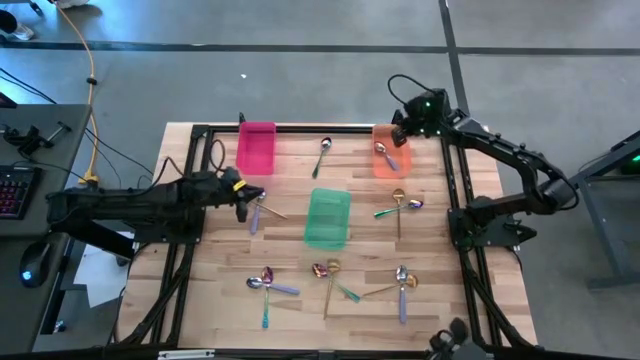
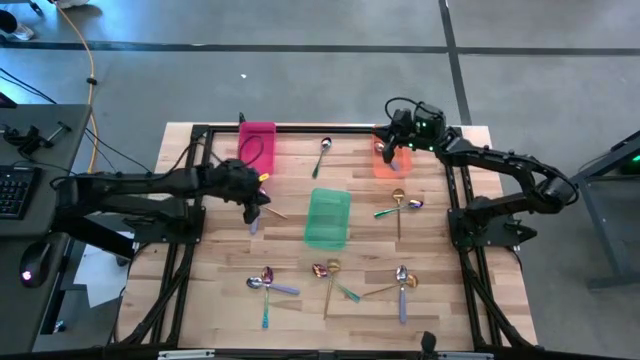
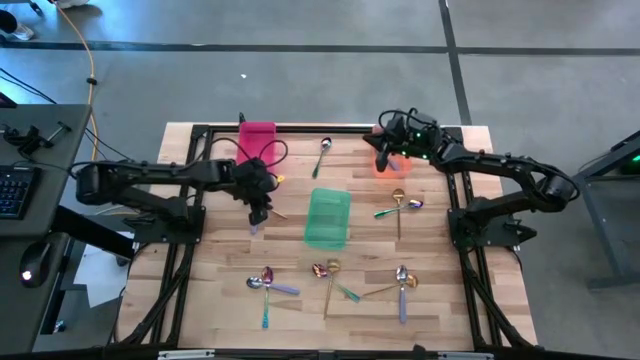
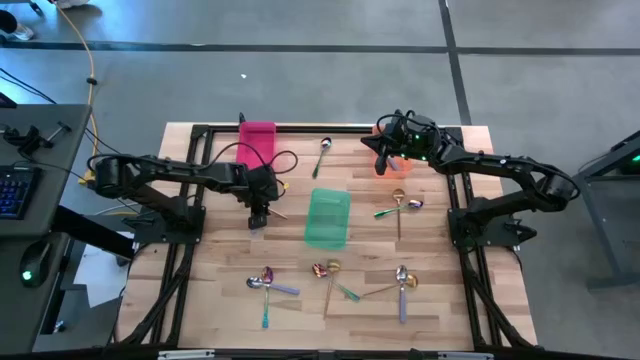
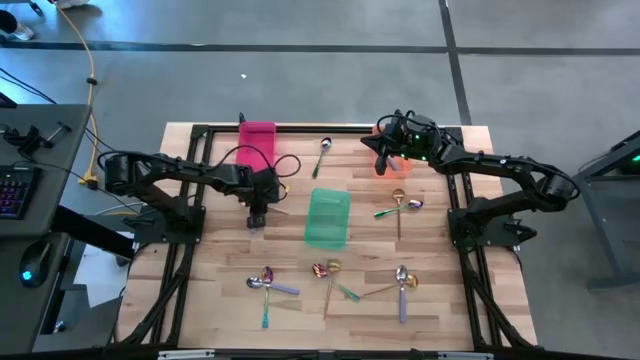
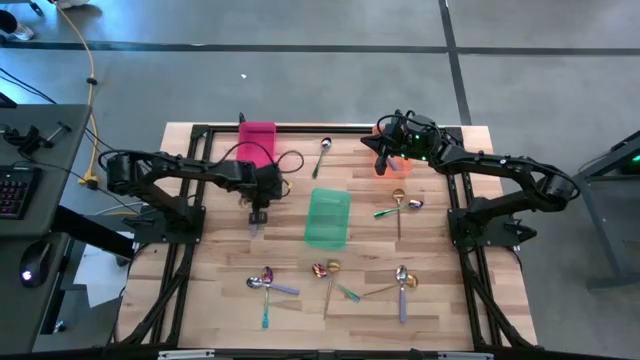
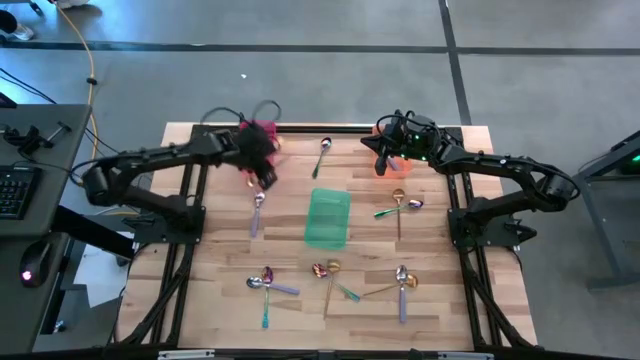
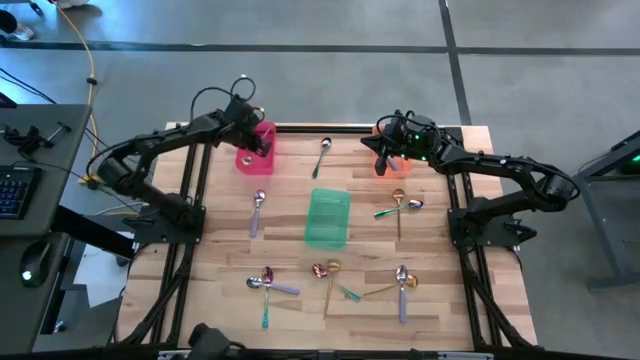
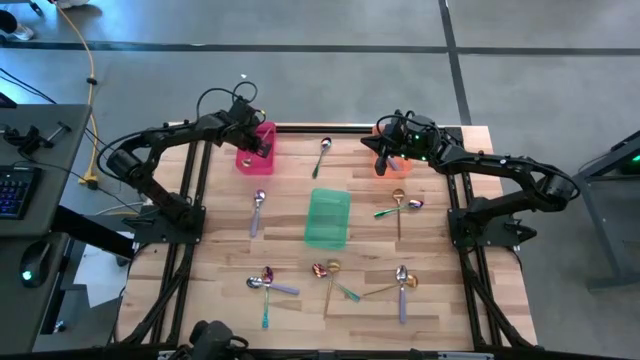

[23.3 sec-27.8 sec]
Task: Sort silverware by color (type)
Put the top left gold spoon in the pink bin

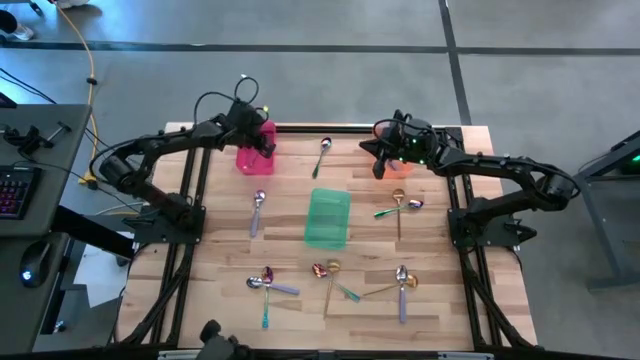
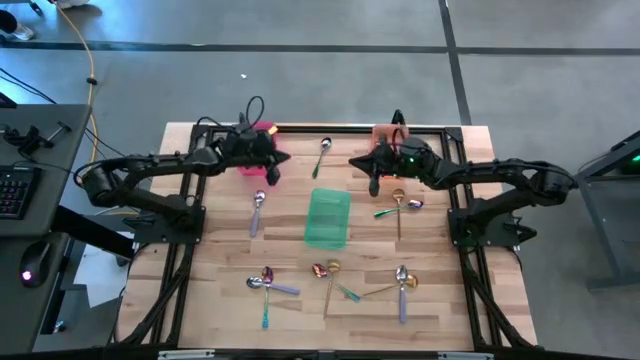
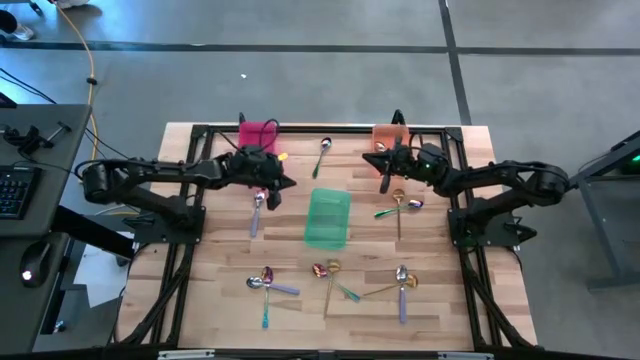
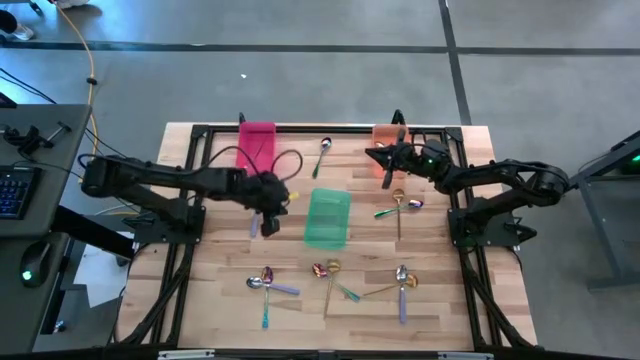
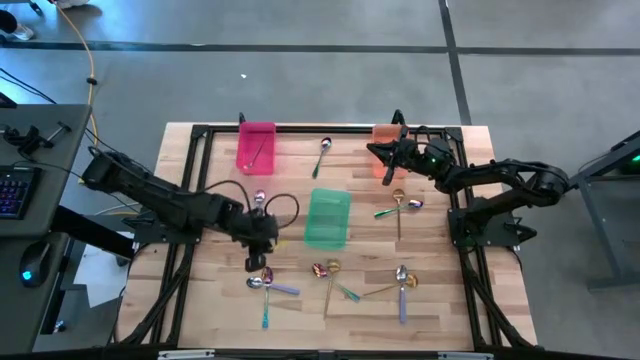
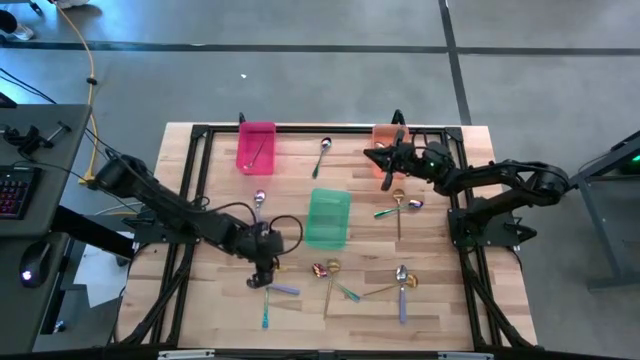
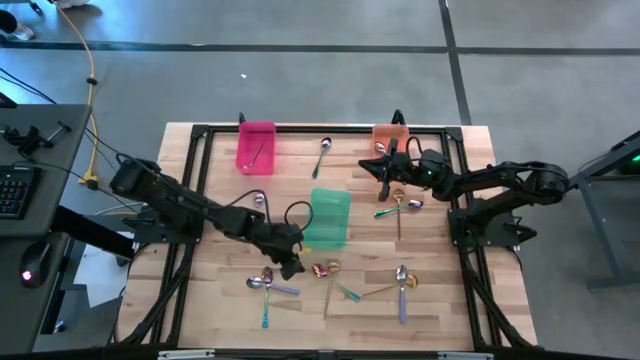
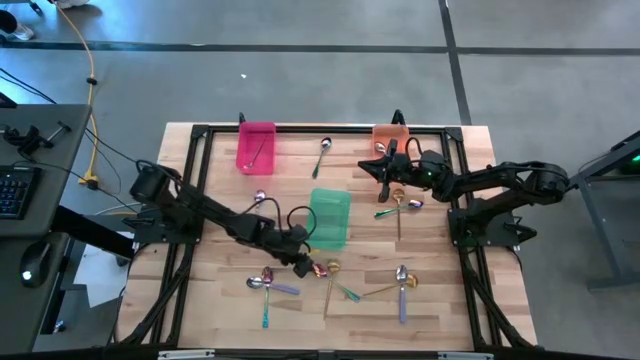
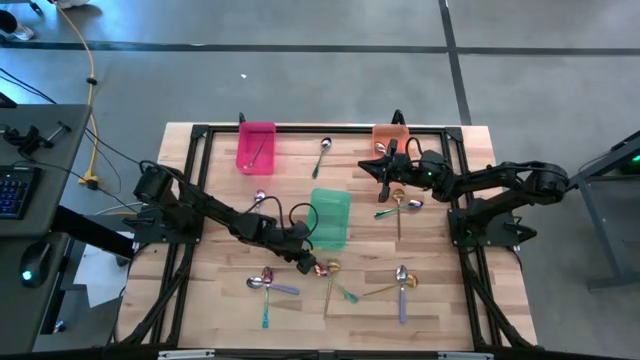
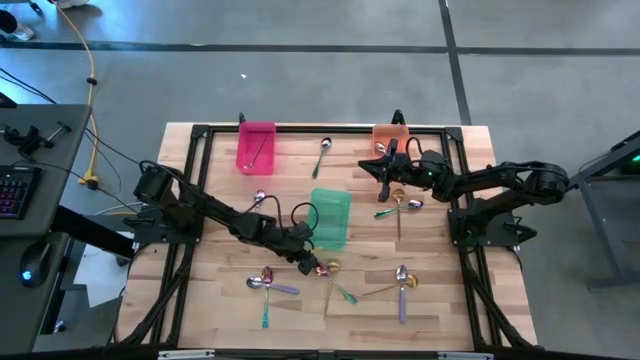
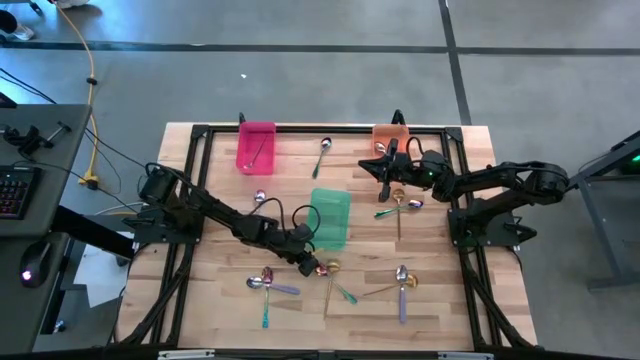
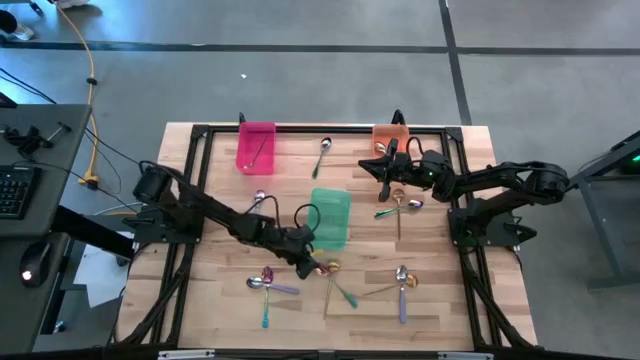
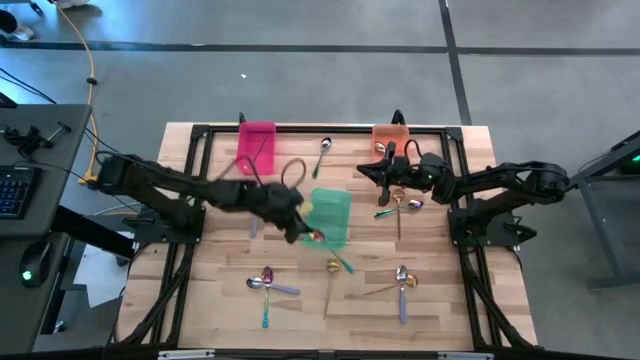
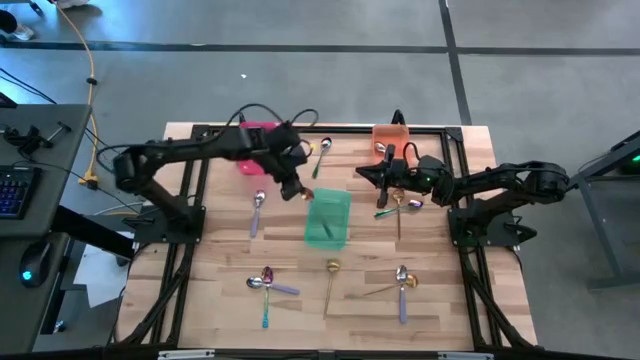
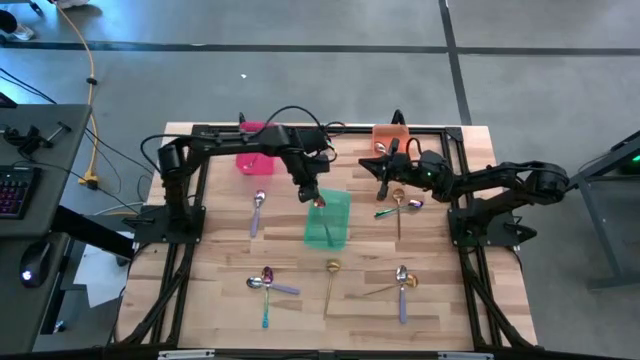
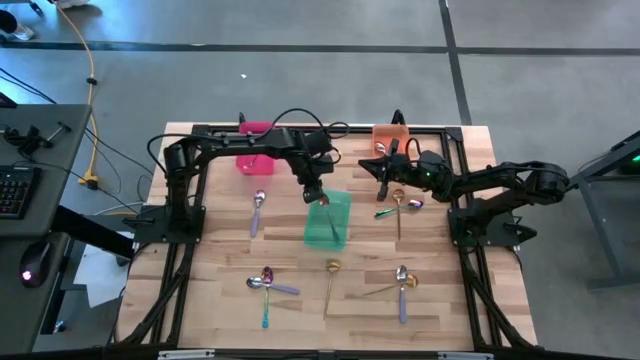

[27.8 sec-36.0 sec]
Put the bottom right blue spoon into the green bin

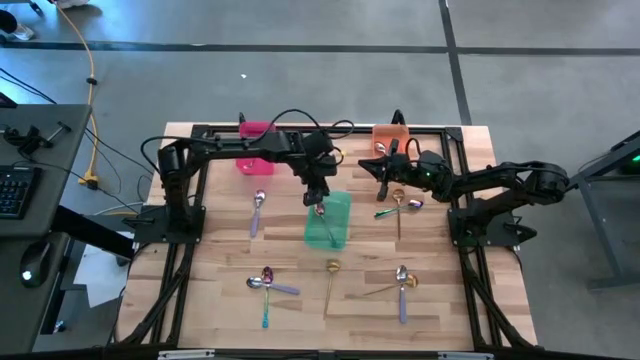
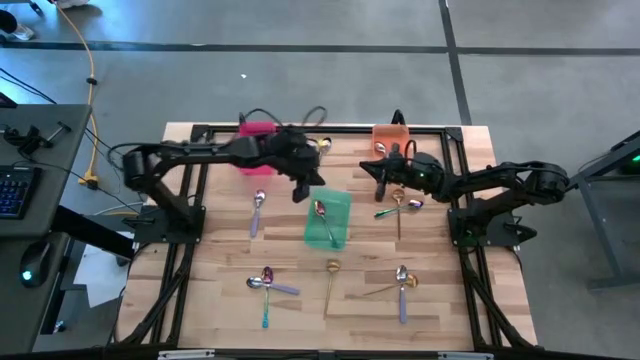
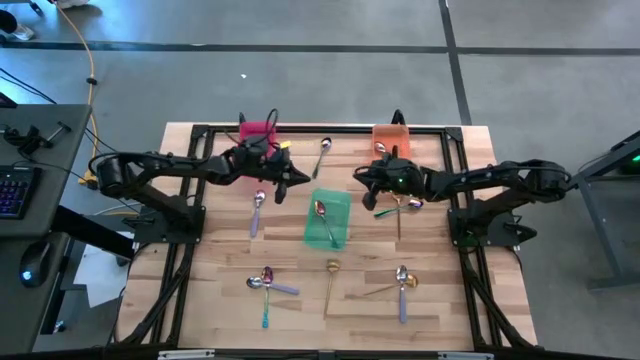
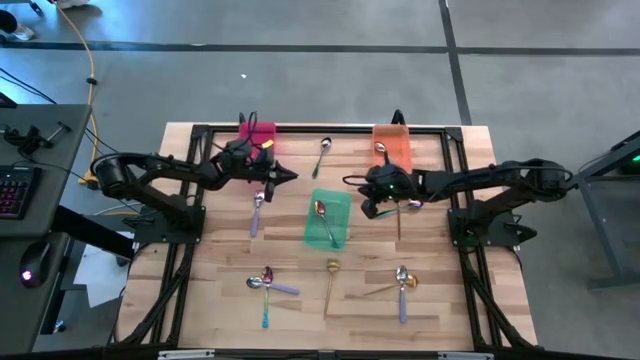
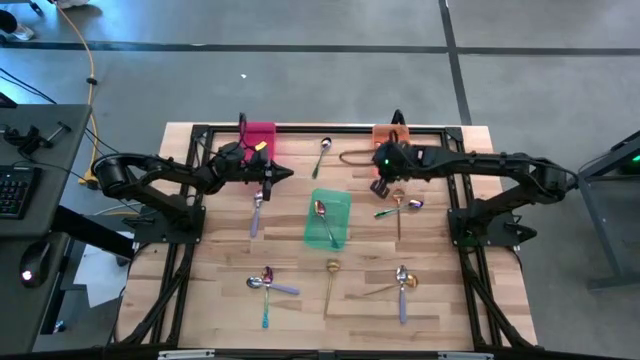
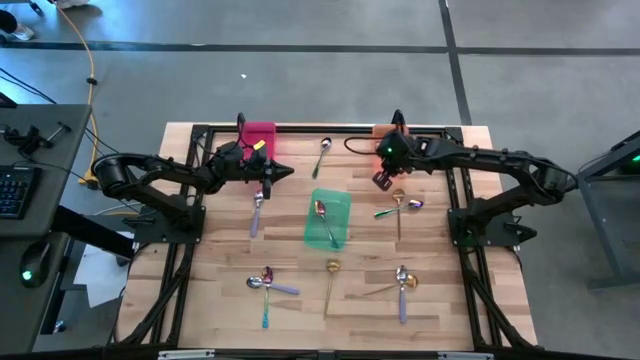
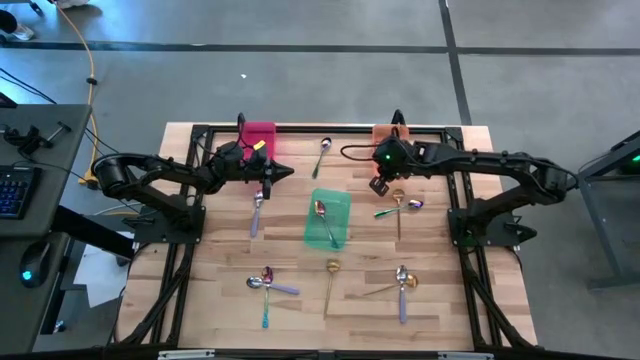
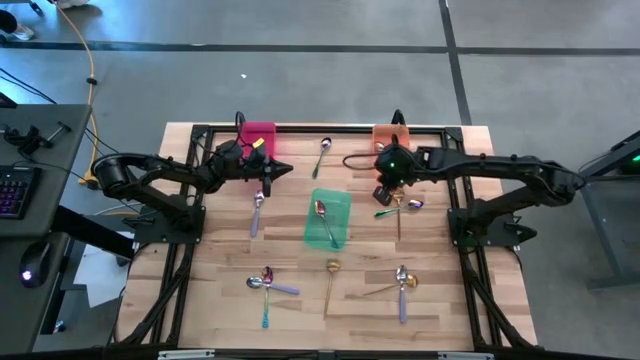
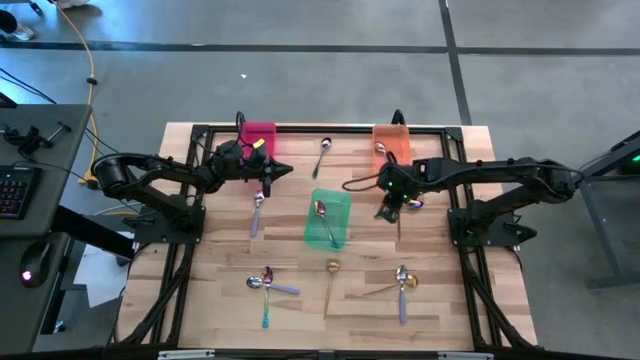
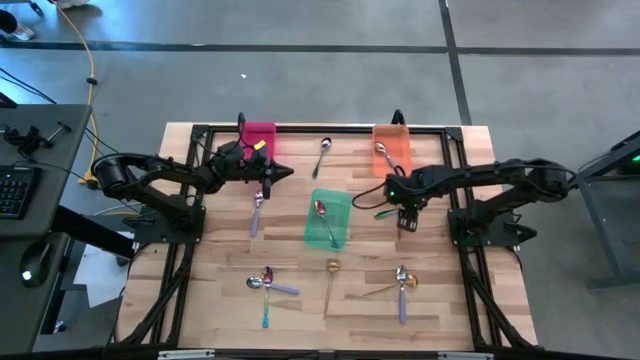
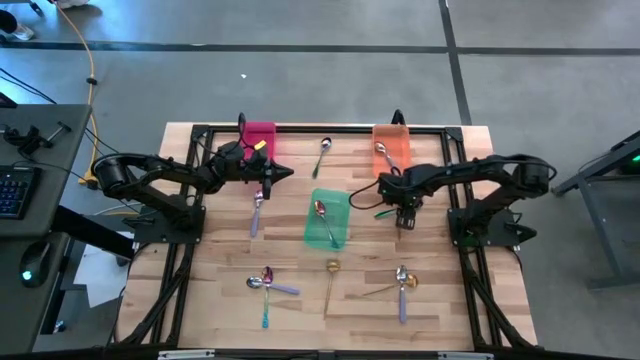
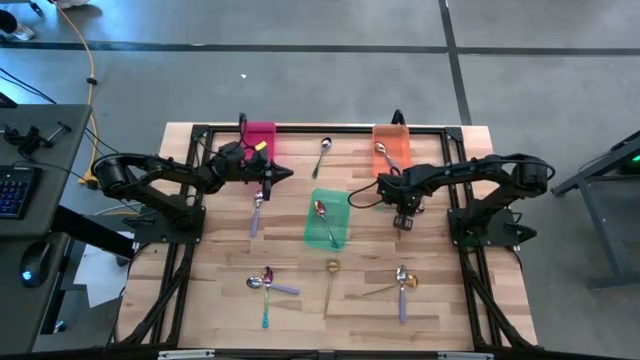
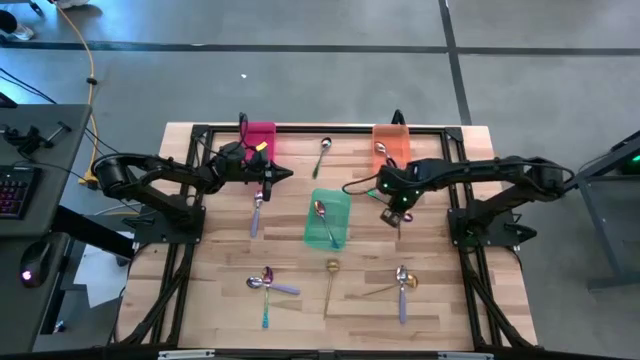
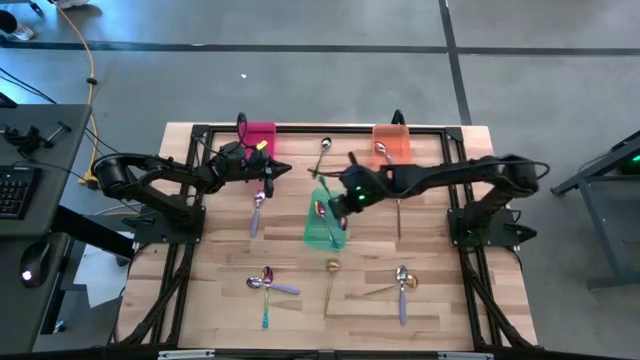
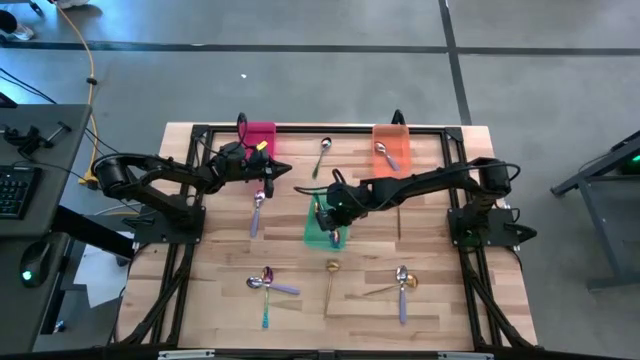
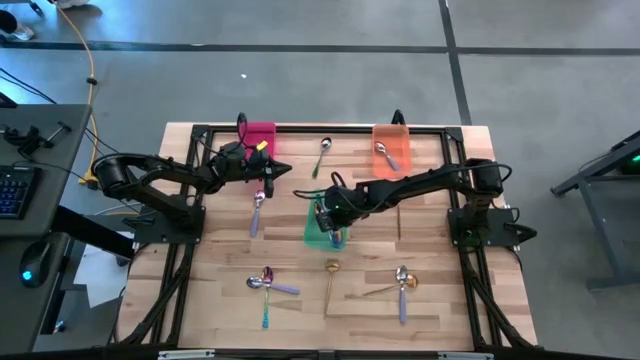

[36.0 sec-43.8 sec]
Put the middle right blue spoon into the green bin
